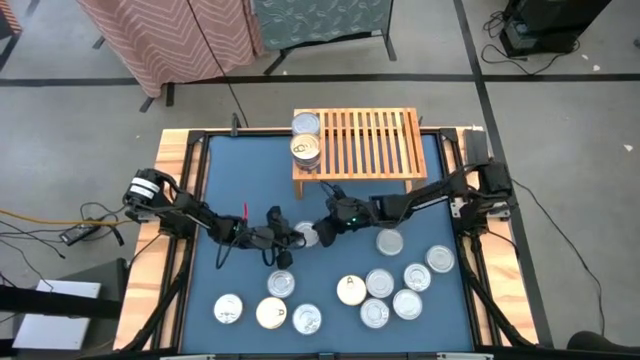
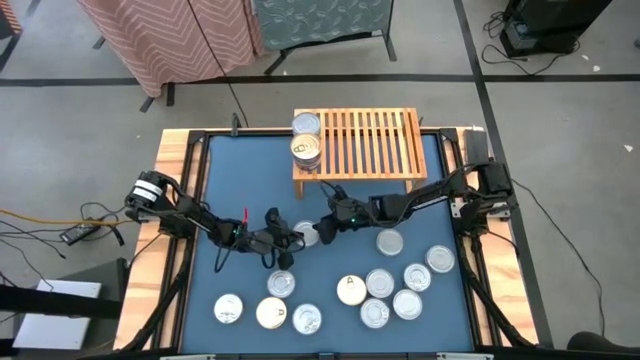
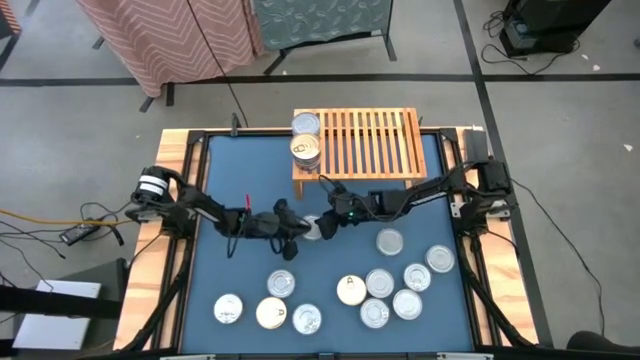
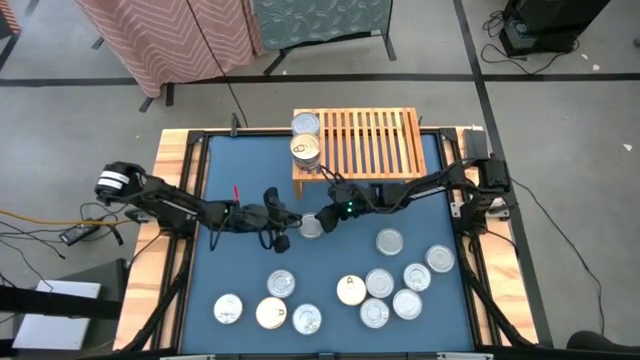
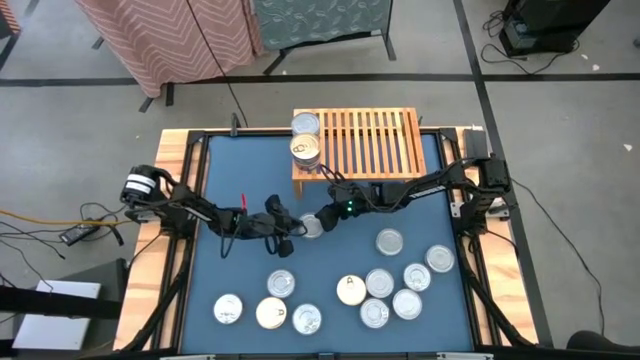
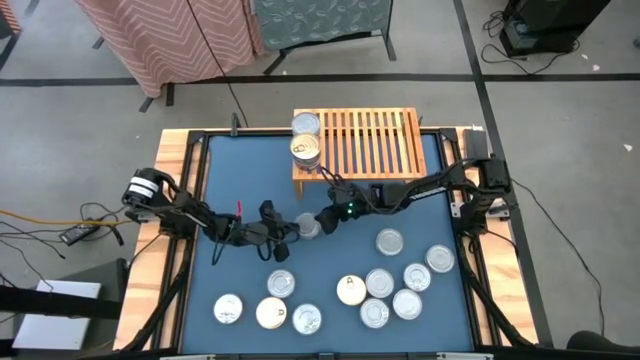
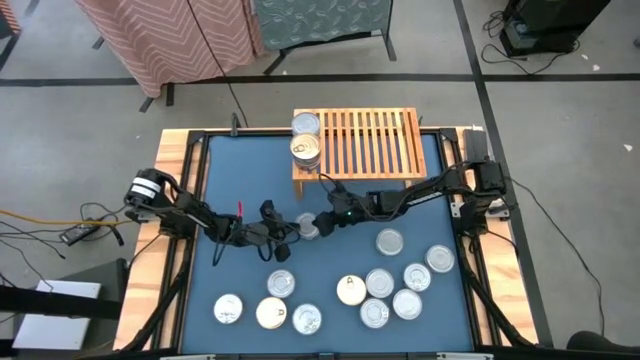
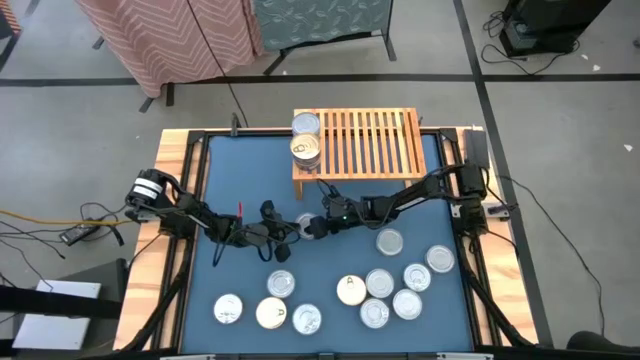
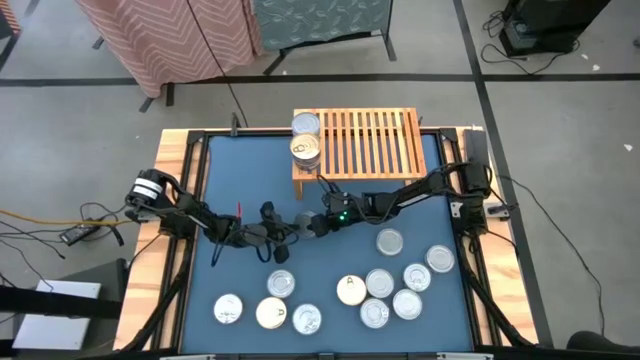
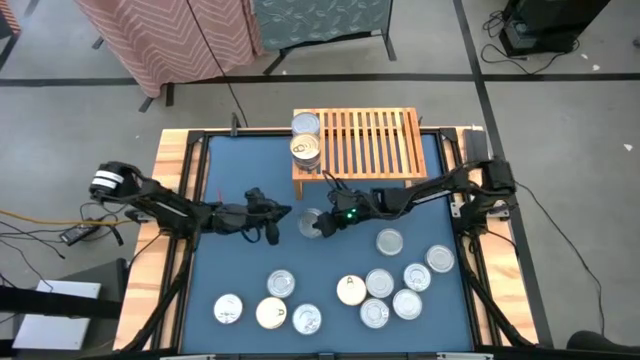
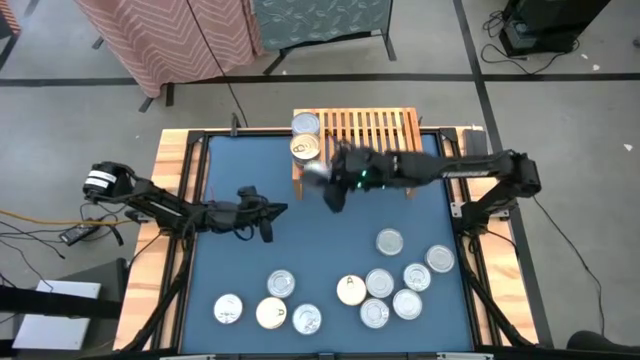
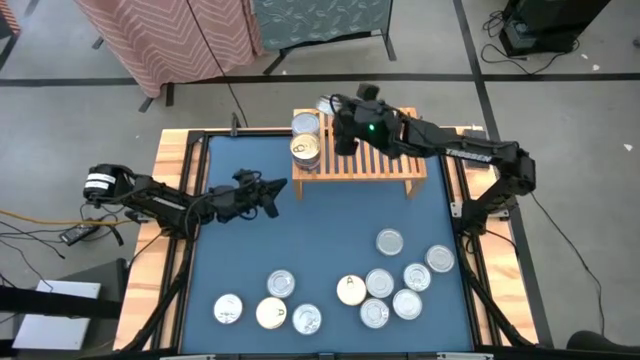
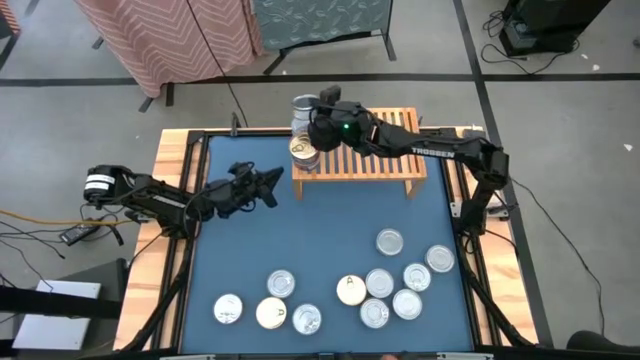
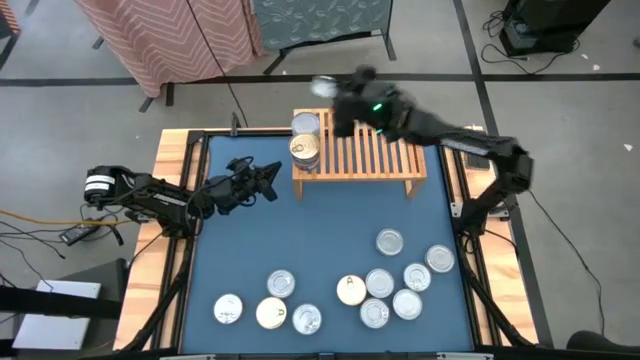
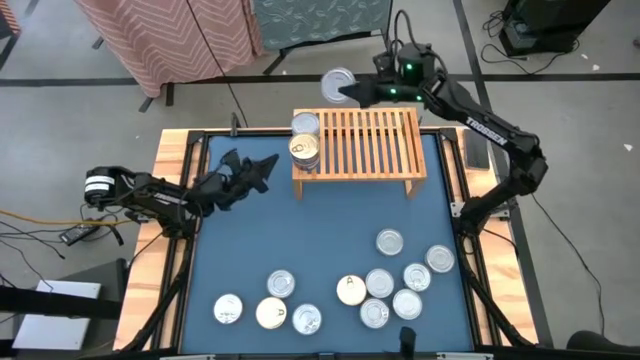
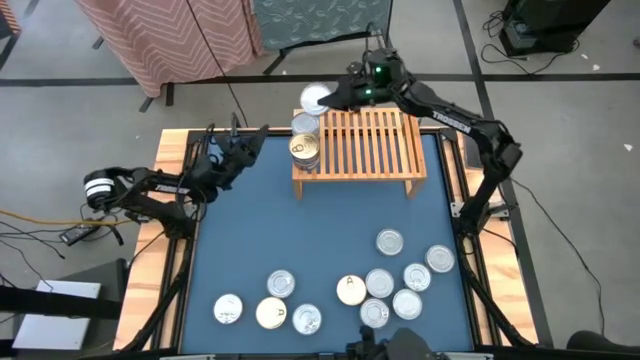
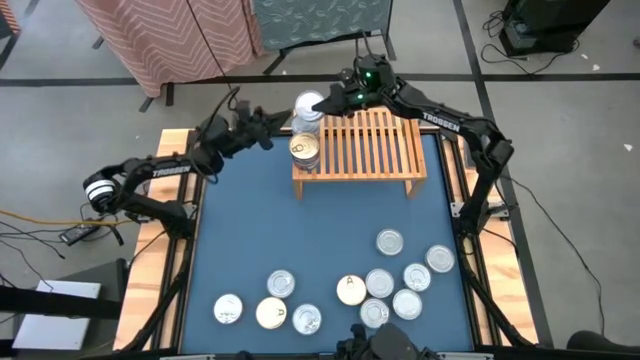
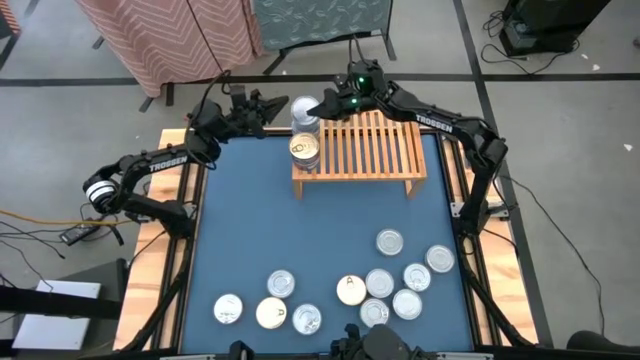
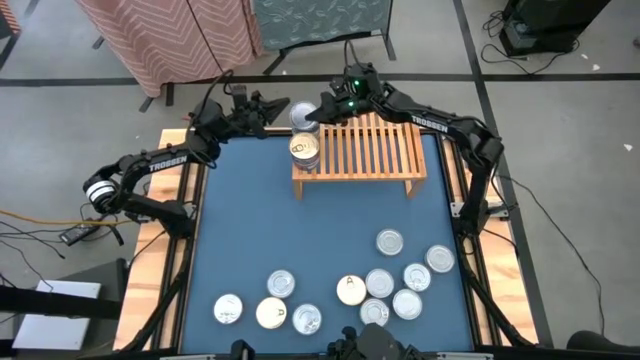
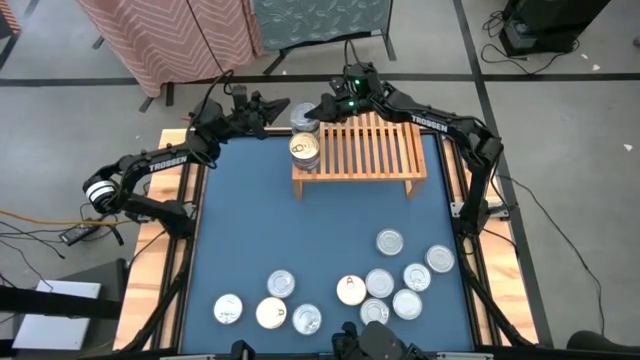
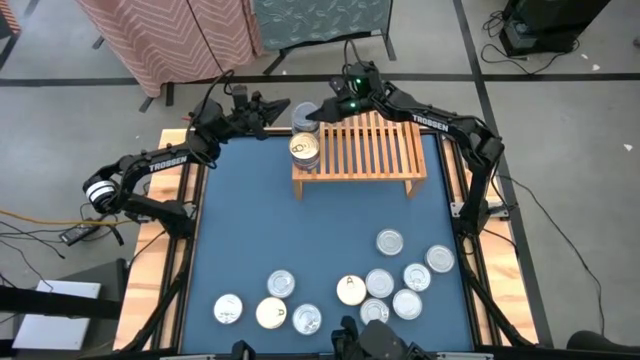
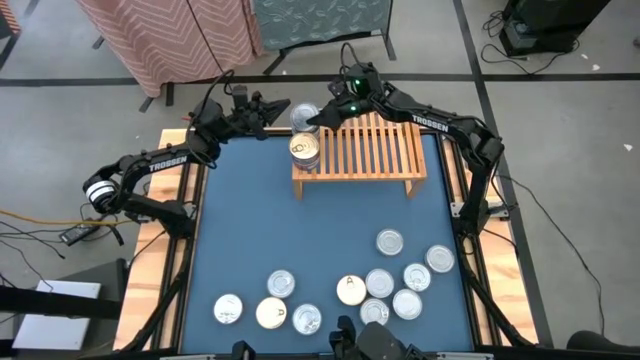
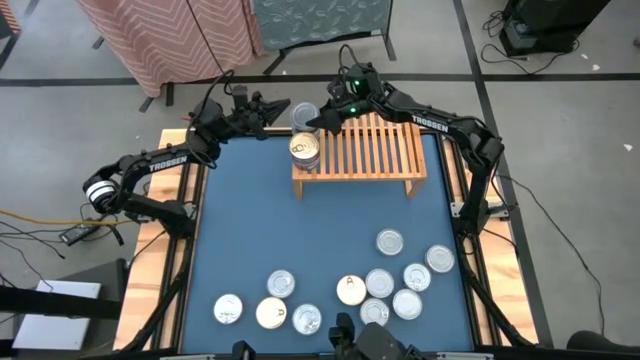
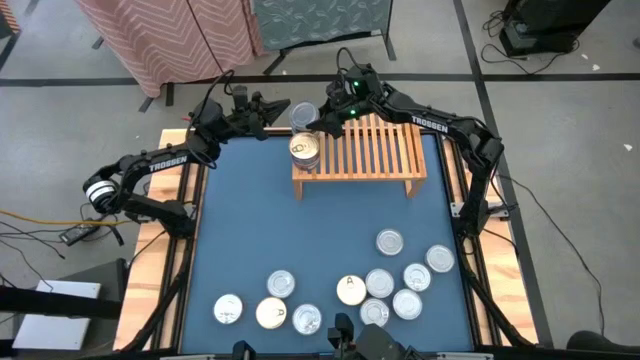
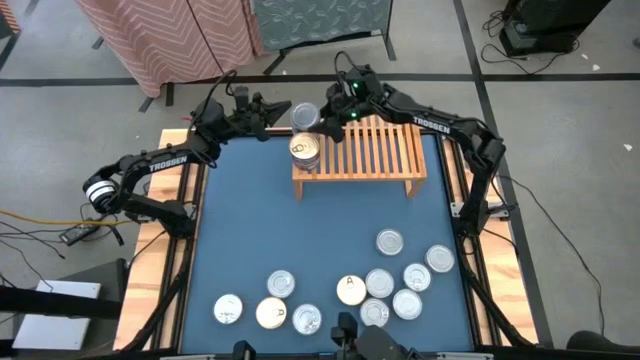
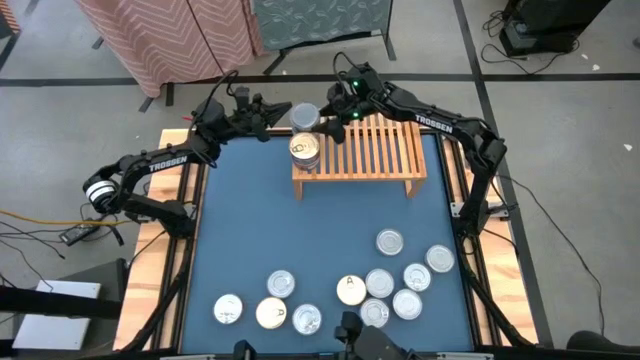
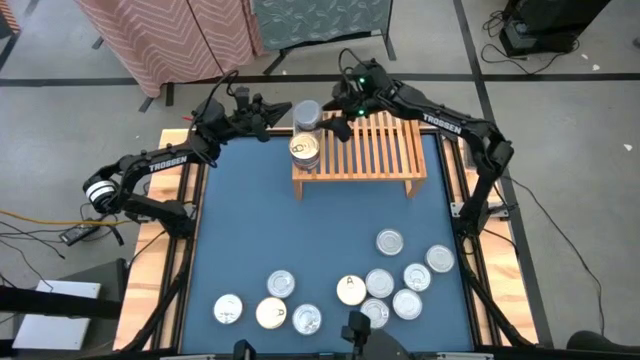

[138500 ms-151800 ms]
Task: Stack canned seafood by type on shelf
Stack the green tuna can on top of the other green tuna cans on the shelf

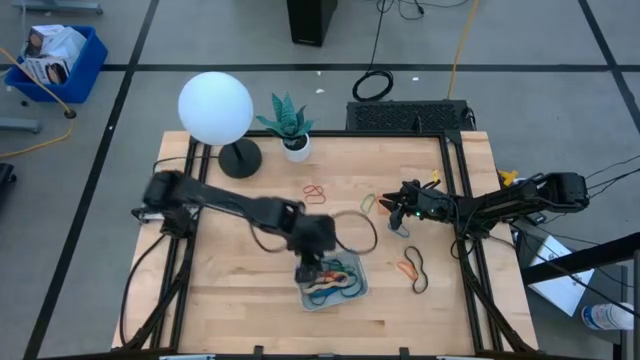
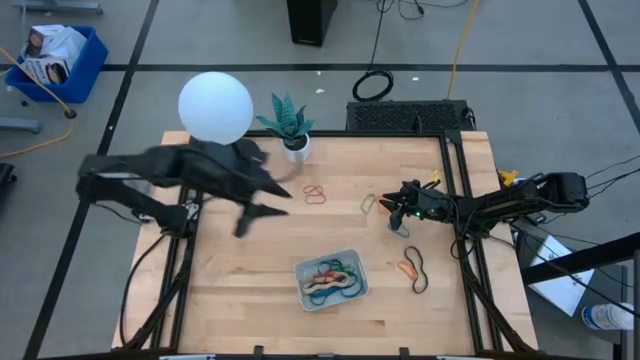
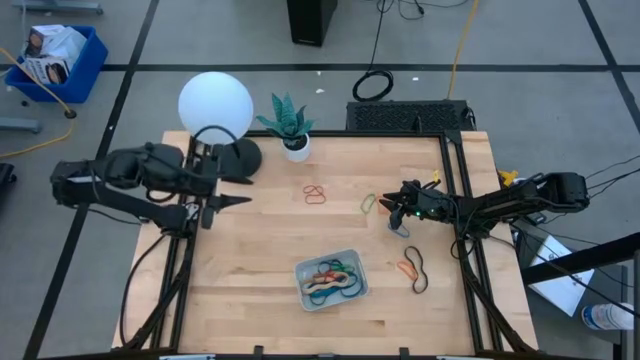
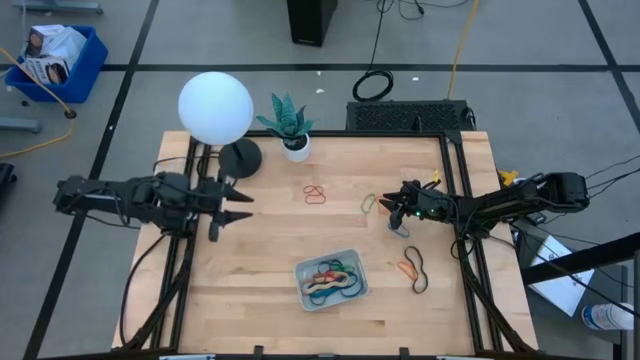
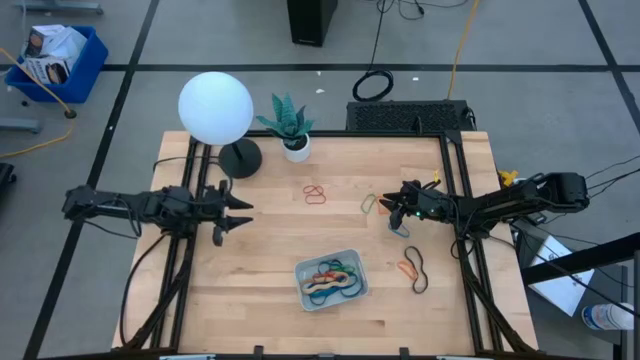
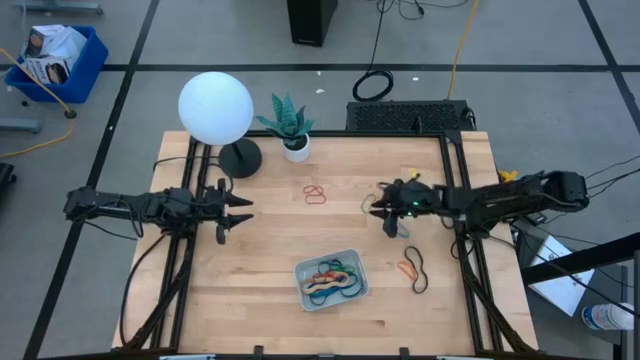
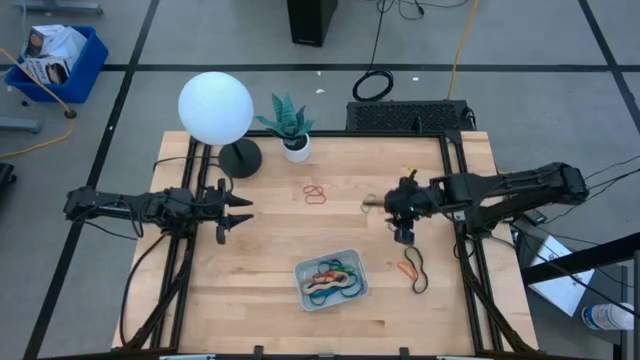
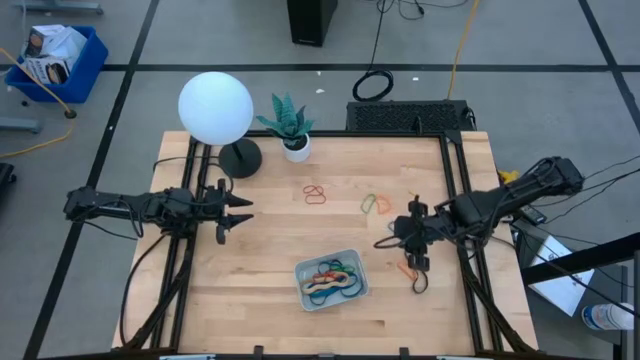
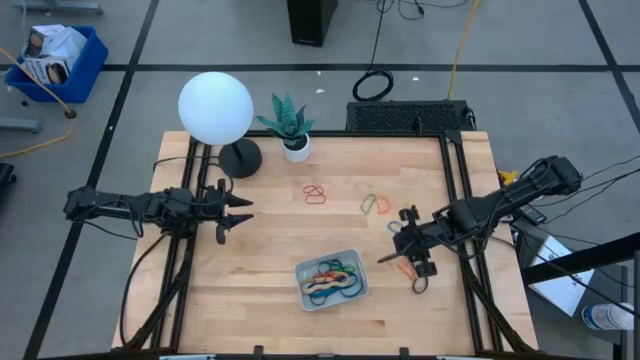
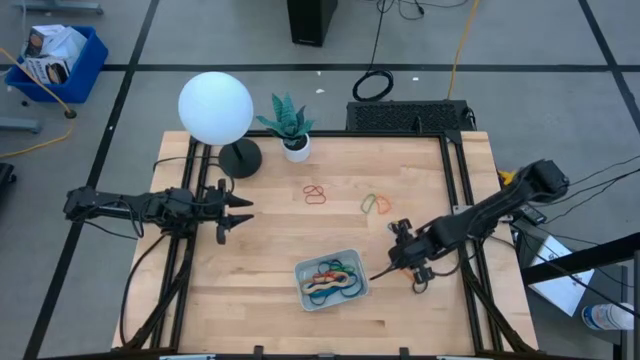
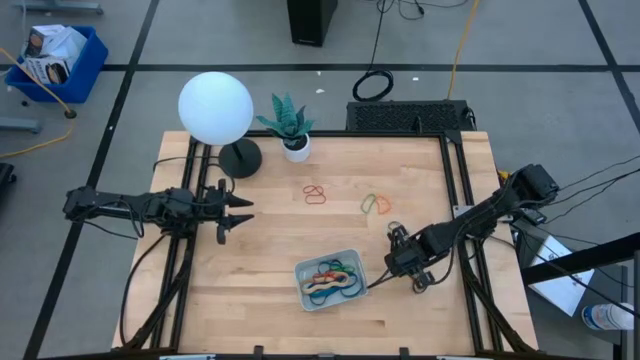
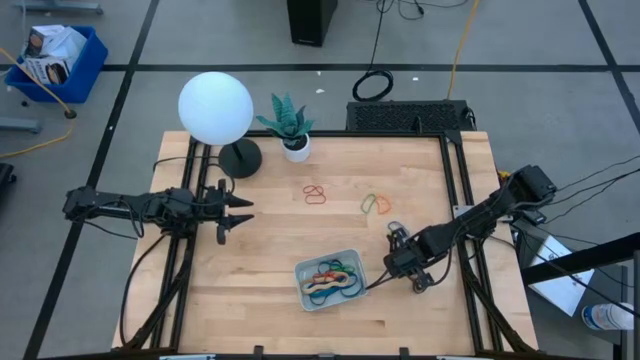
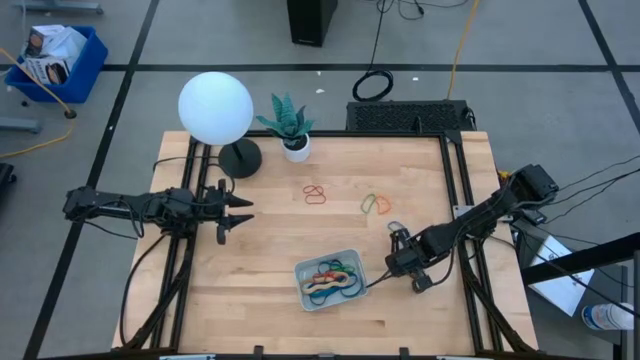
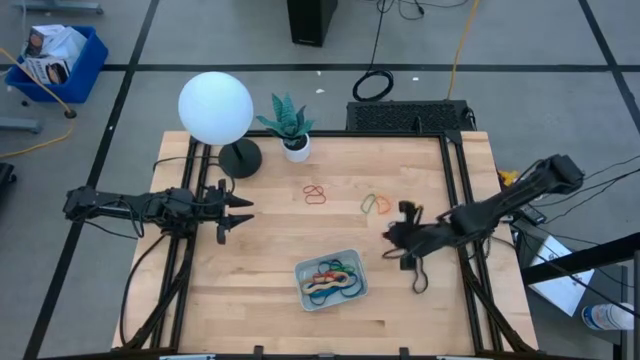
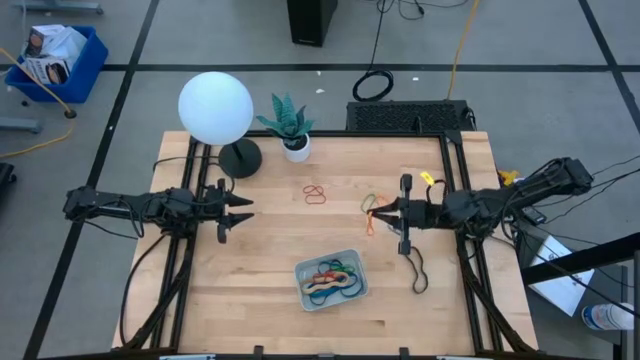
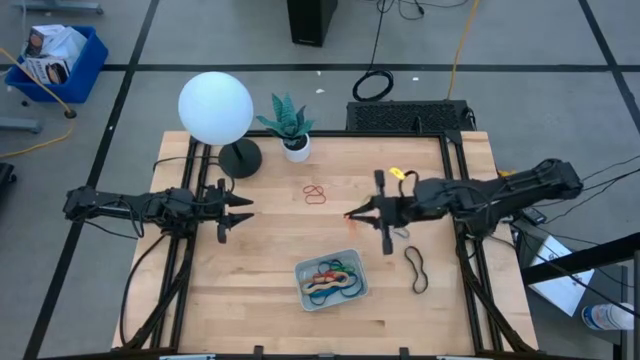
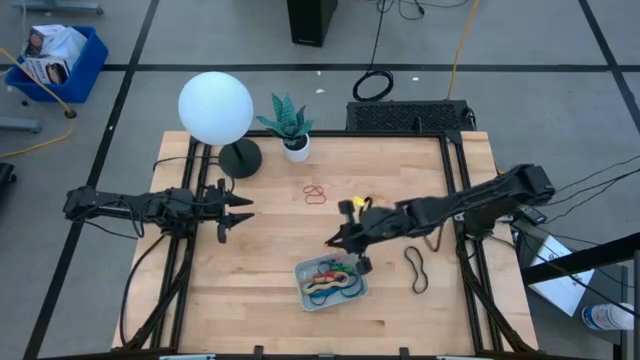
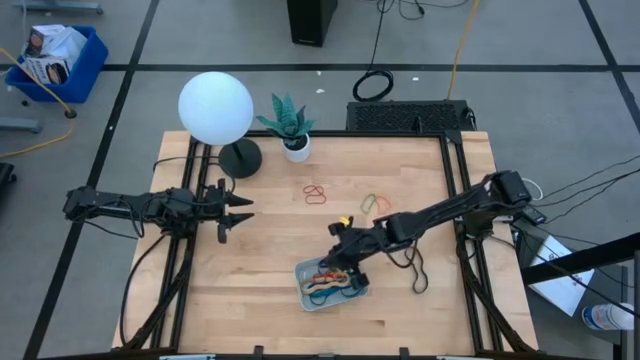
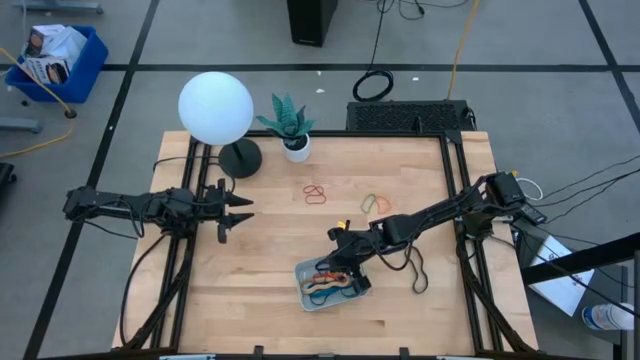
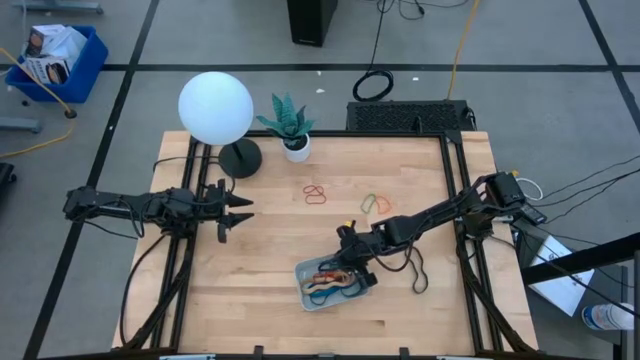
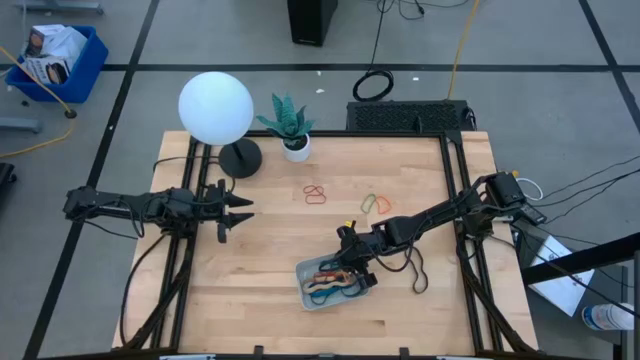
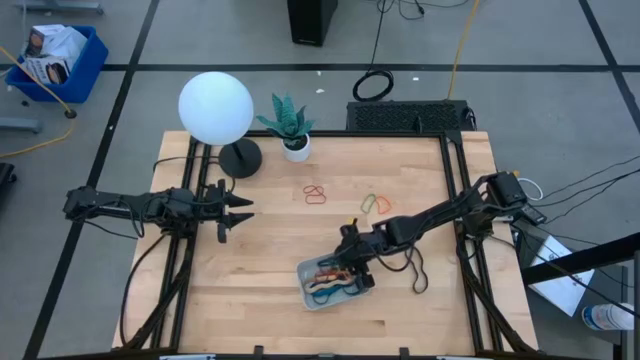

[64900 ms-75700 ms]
Task: Pick and place rubber bands into bin
Put the bottom orange rubber band into the gray bin
